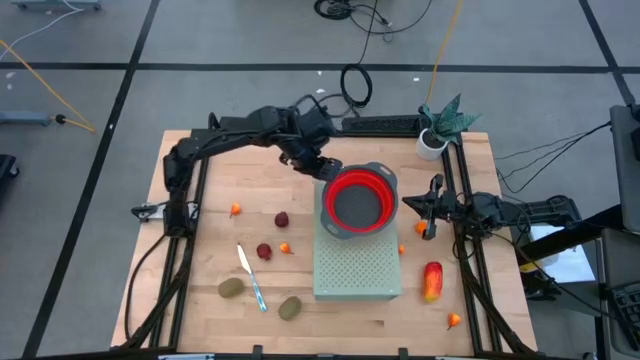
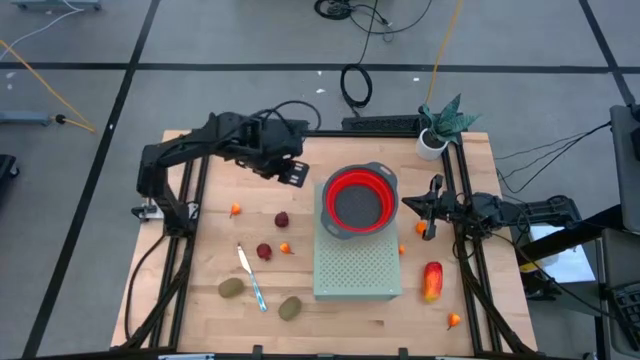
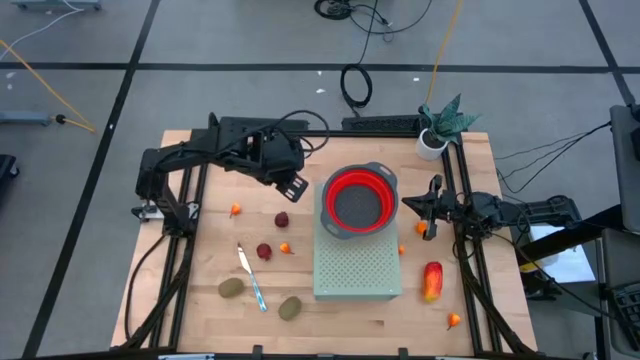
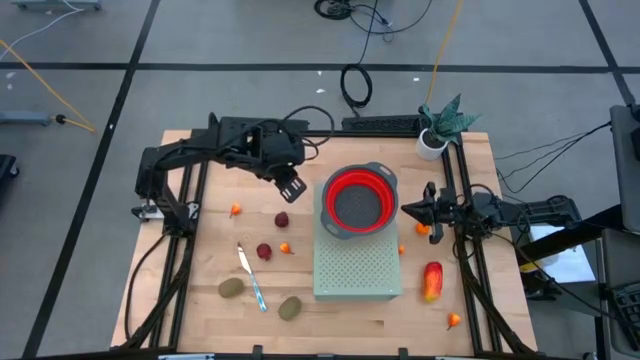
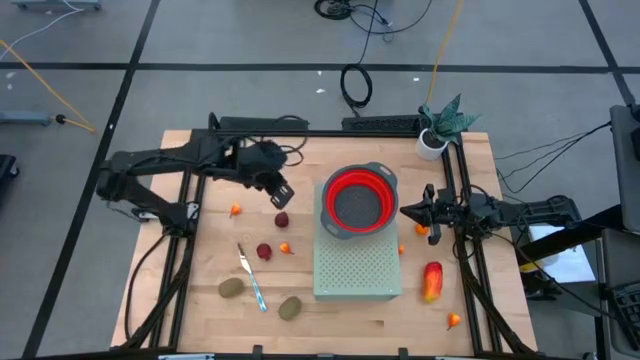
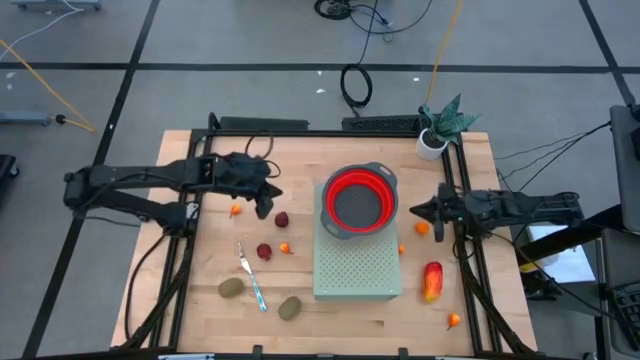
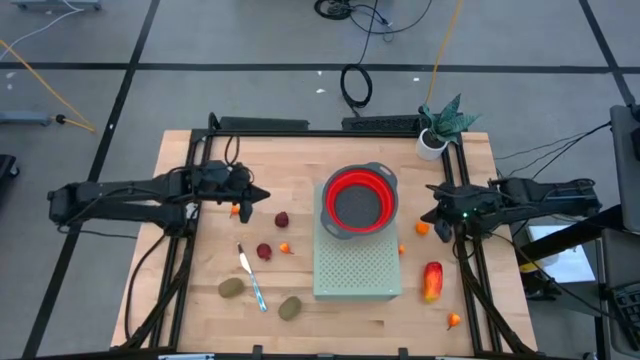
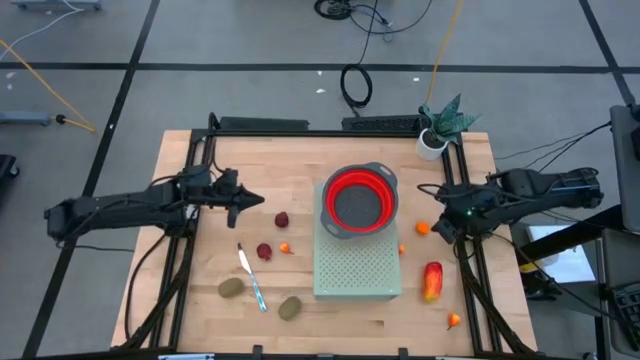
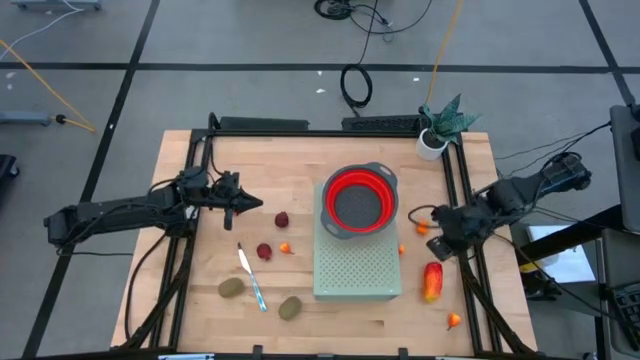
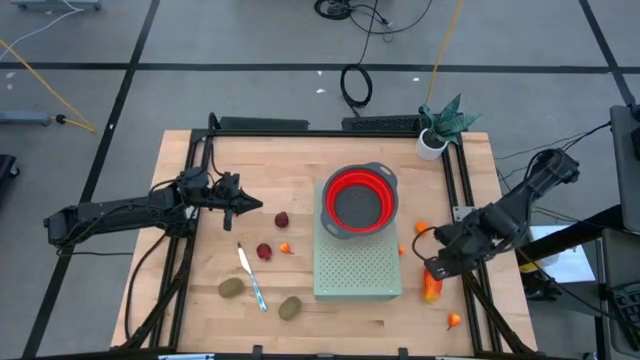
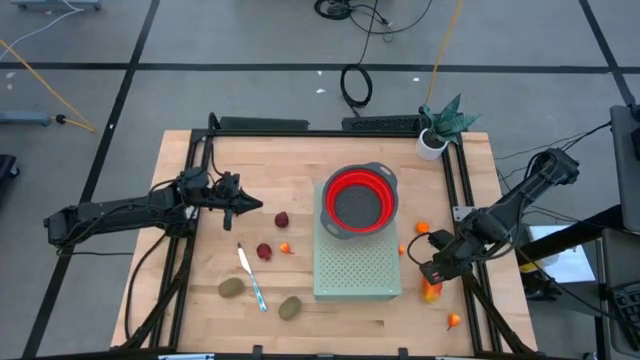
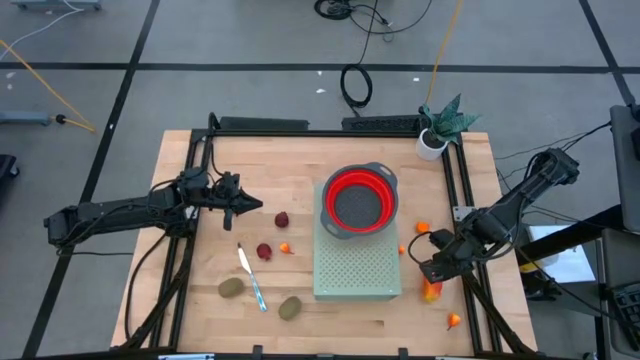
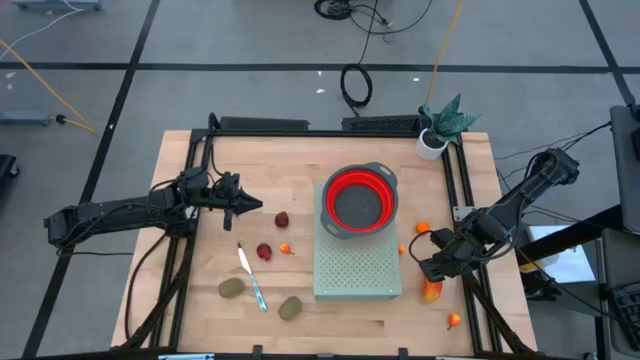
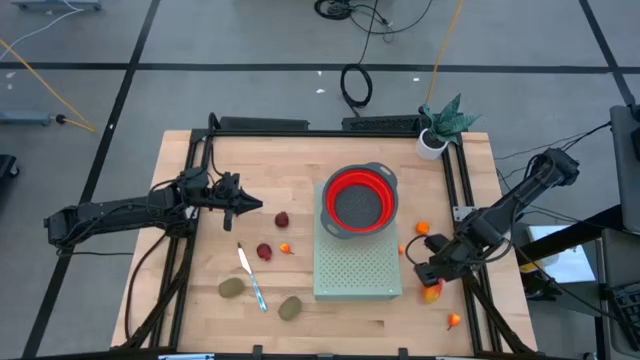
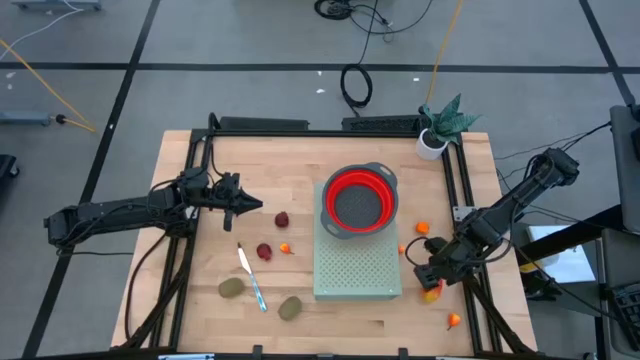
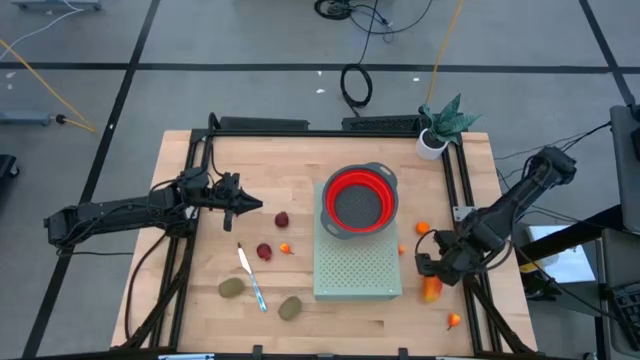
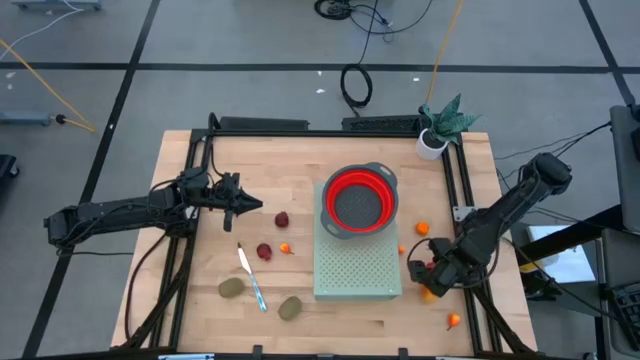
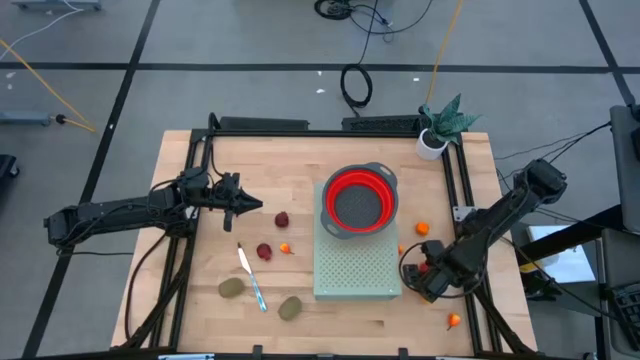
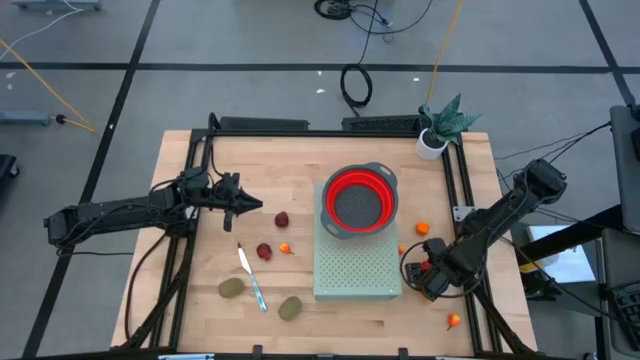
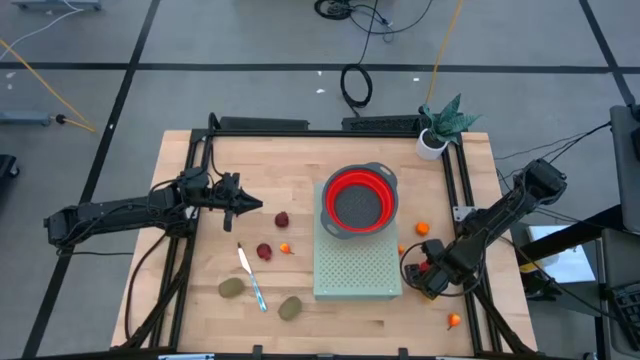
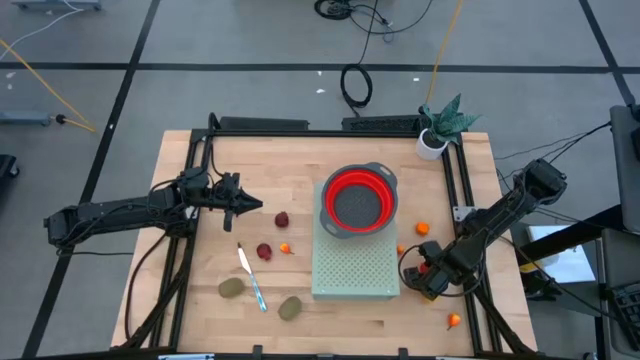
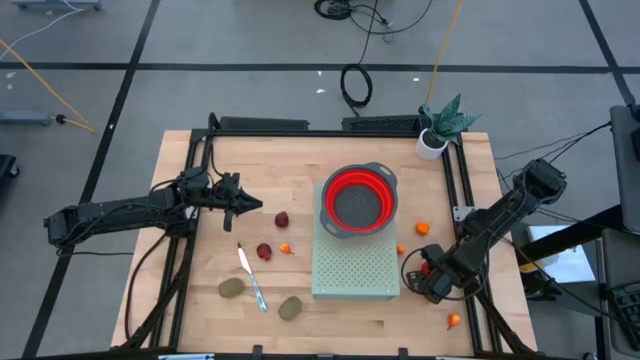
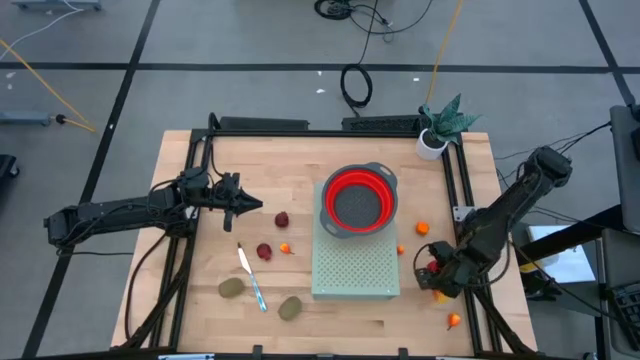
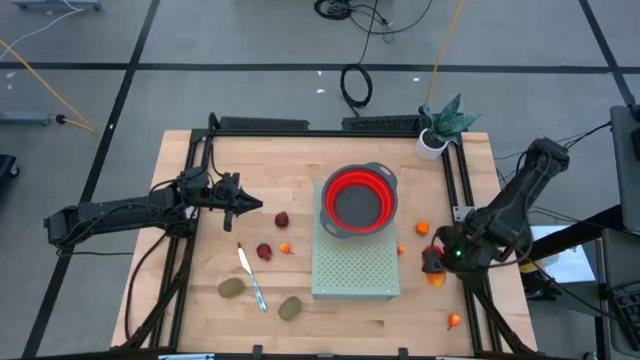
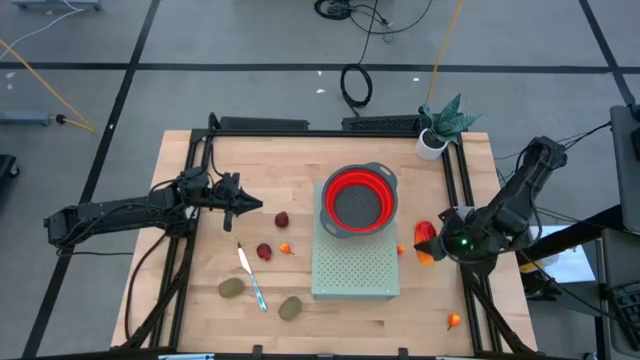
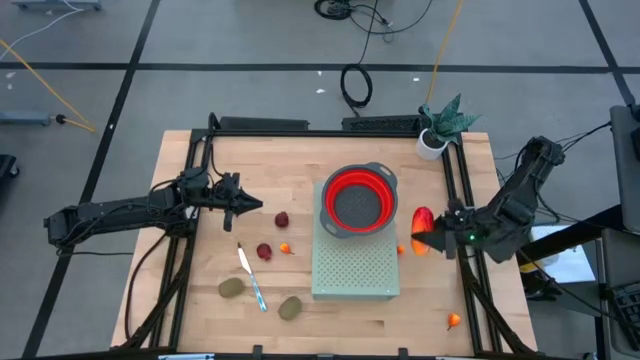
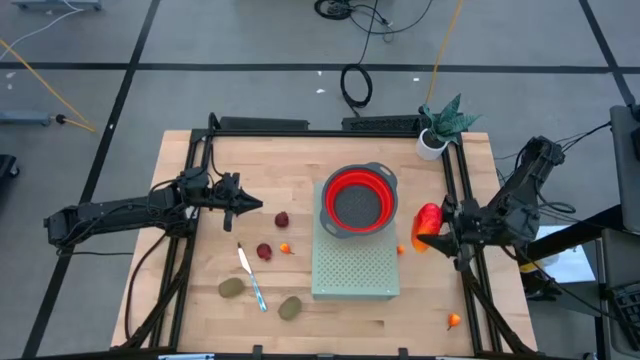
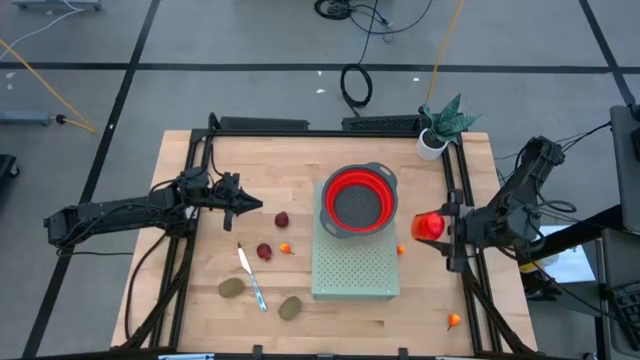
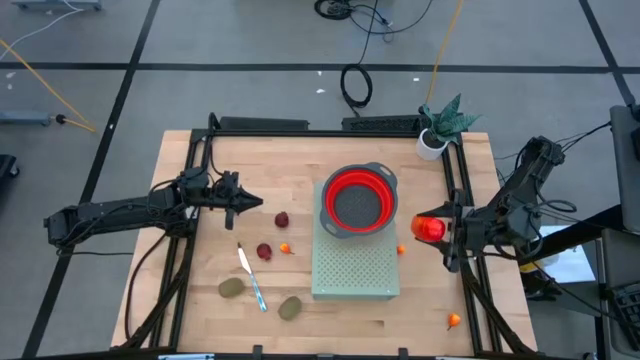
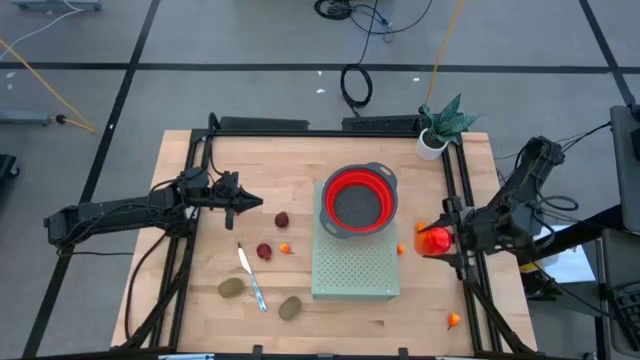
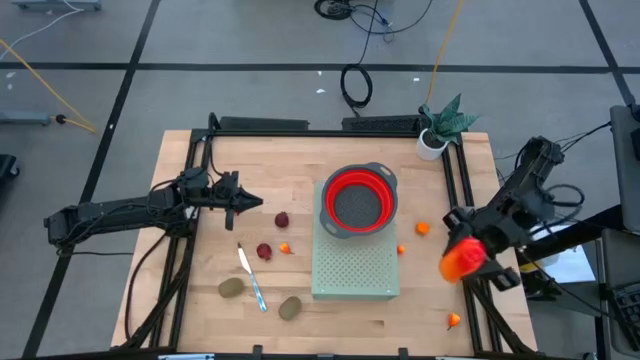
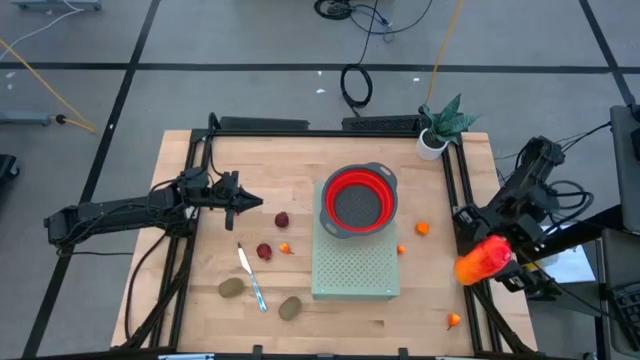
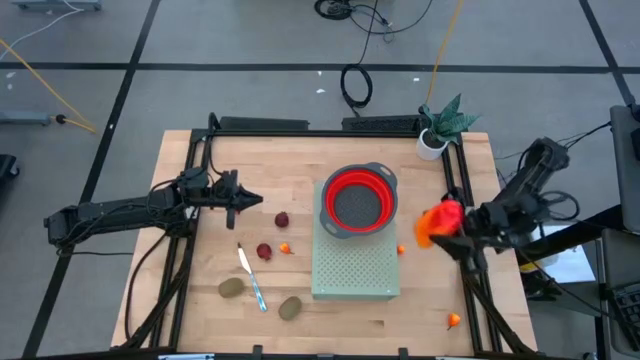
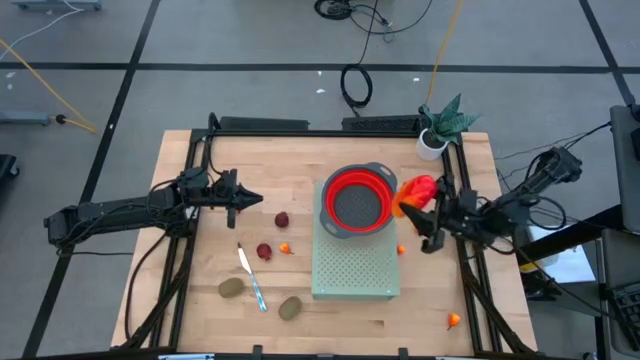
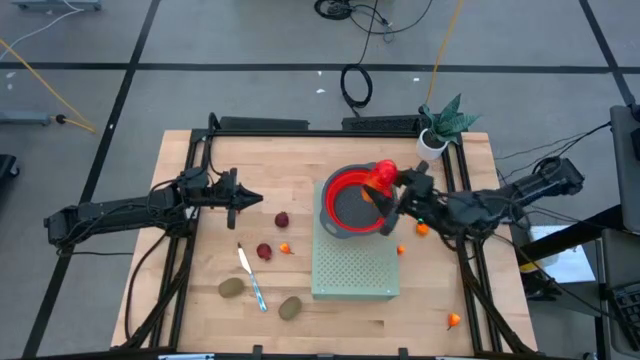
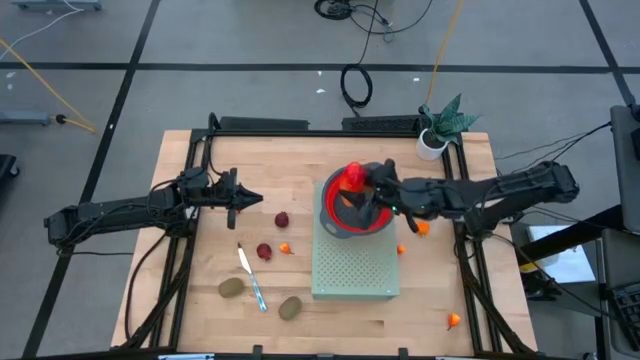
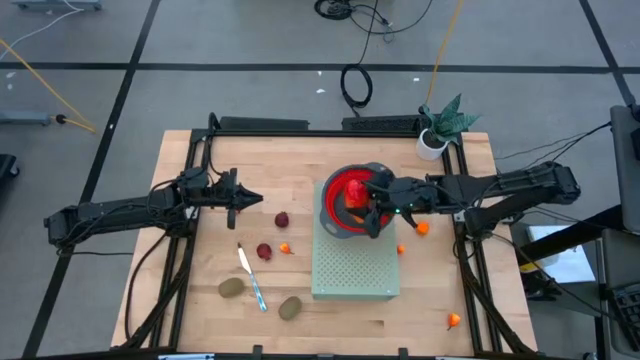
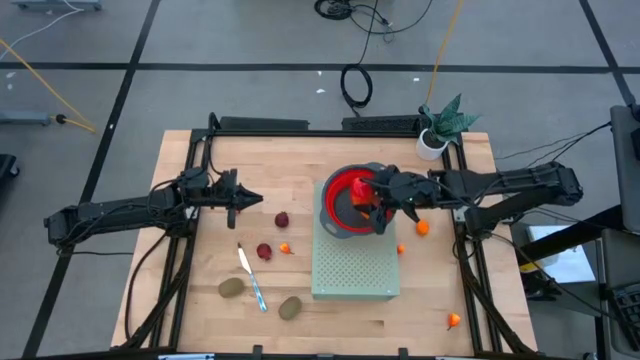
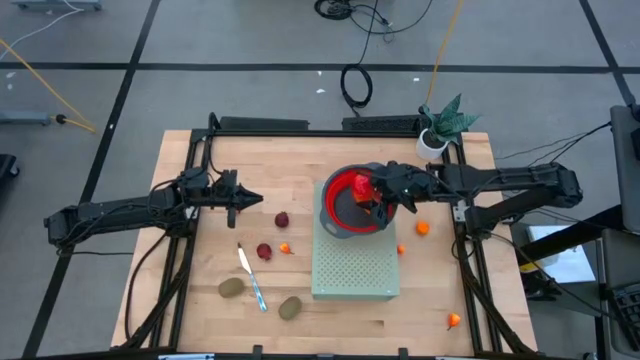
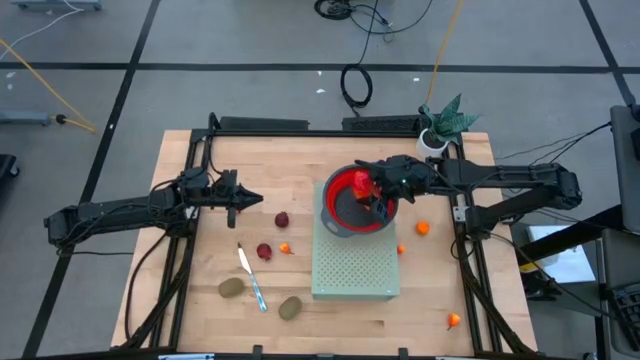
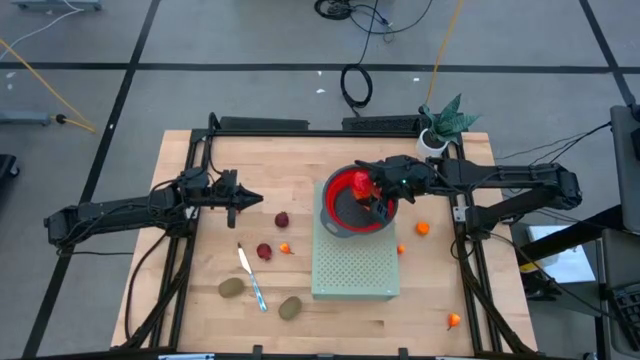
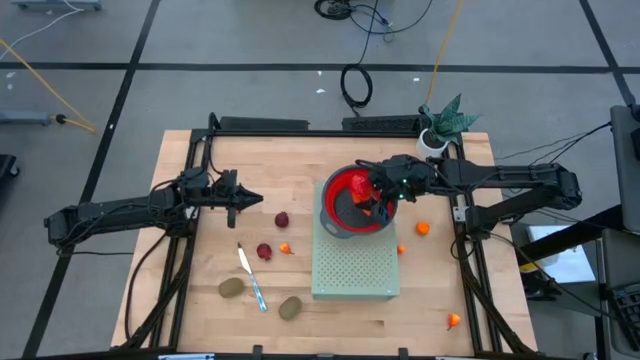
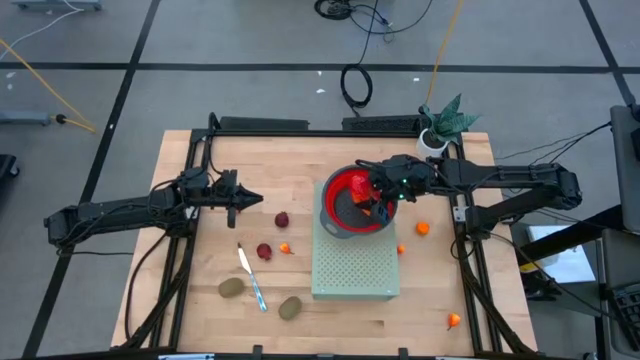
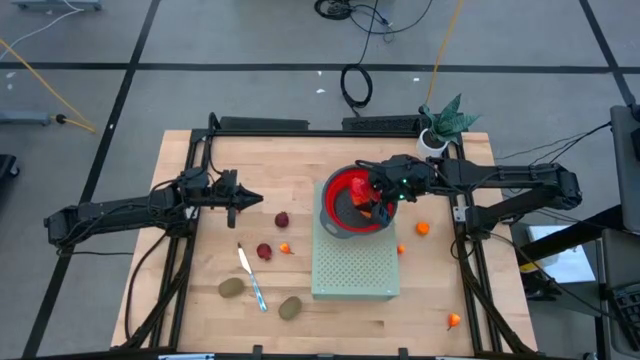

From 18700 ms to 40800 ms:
Task: Pick & Place Fruit
Put the mango into the red strainer bowl on the shelf
